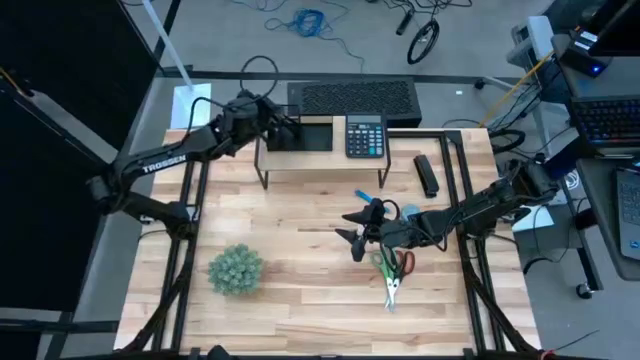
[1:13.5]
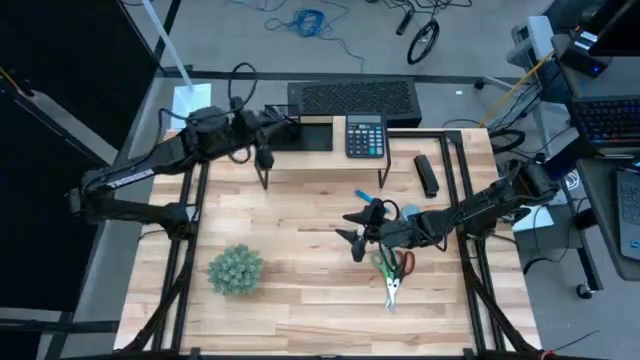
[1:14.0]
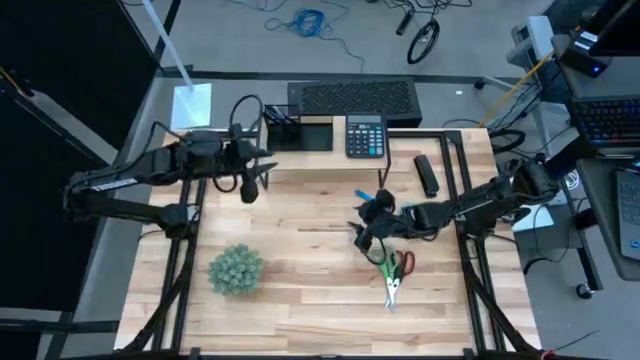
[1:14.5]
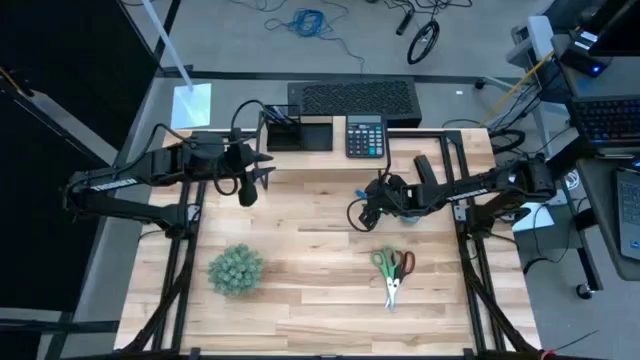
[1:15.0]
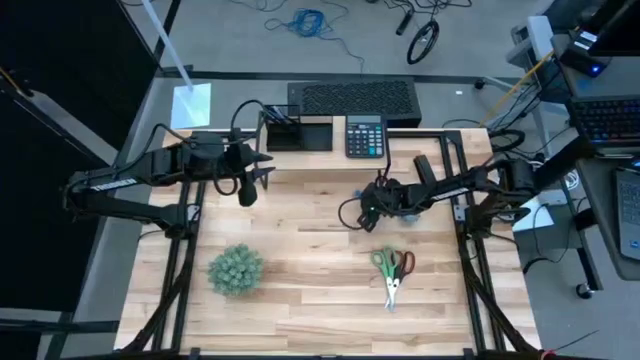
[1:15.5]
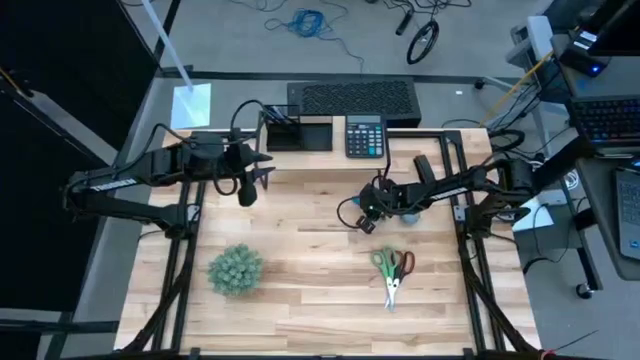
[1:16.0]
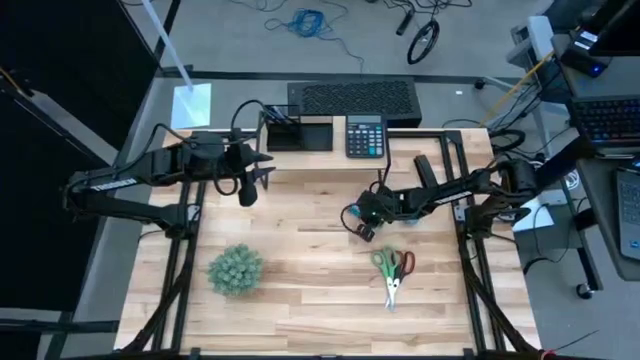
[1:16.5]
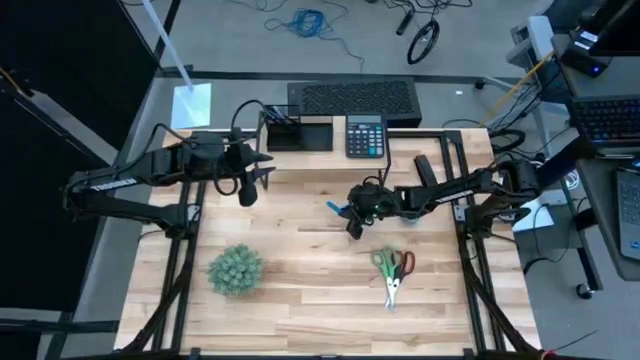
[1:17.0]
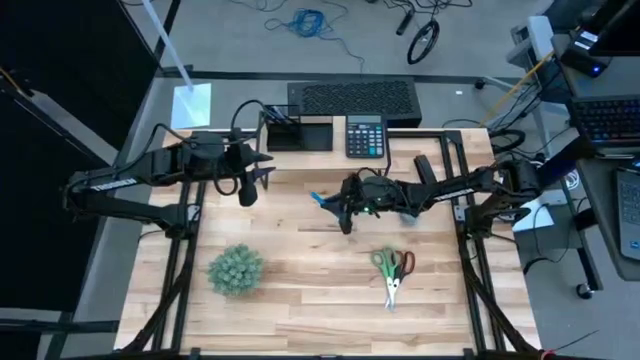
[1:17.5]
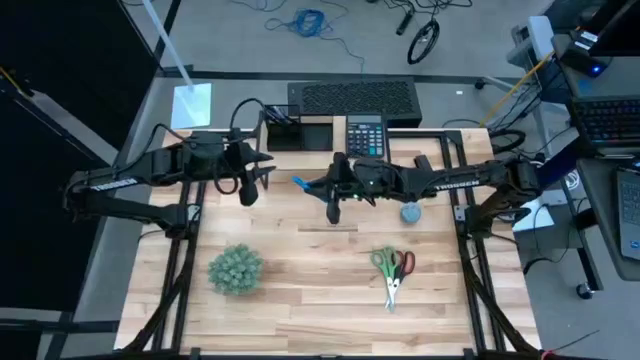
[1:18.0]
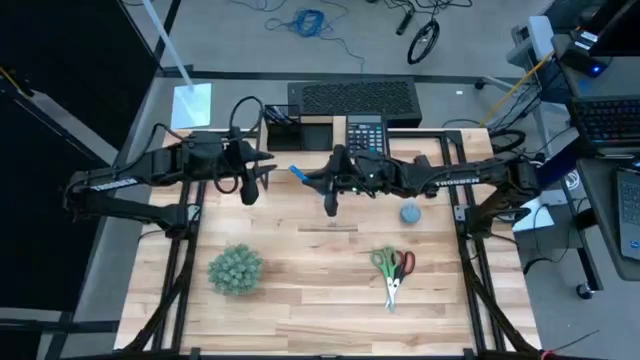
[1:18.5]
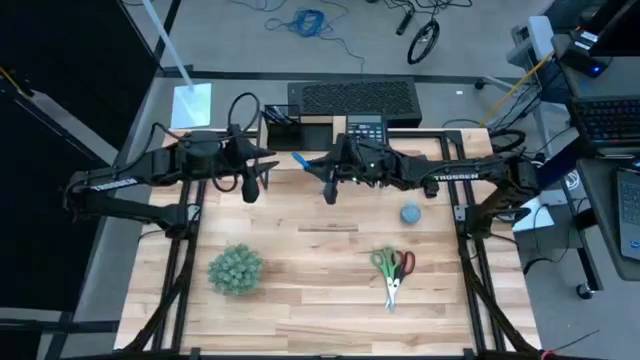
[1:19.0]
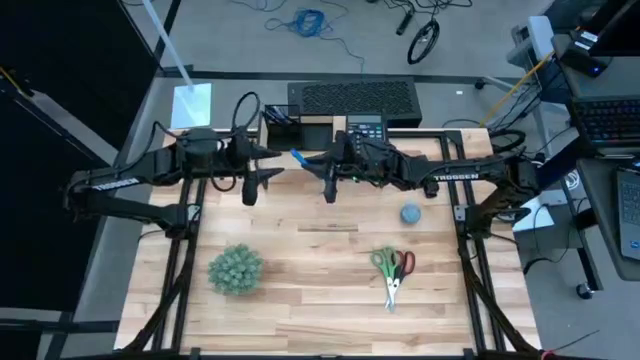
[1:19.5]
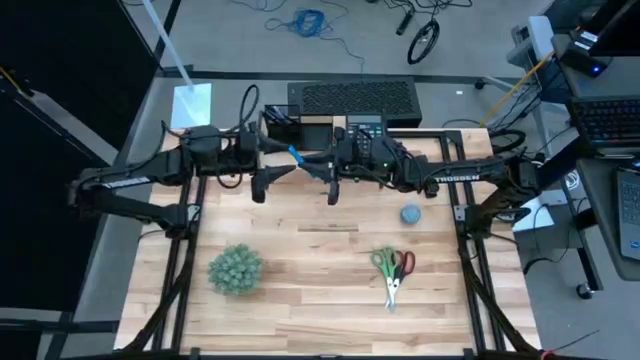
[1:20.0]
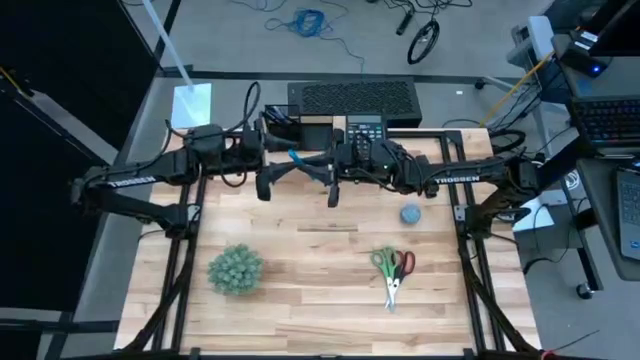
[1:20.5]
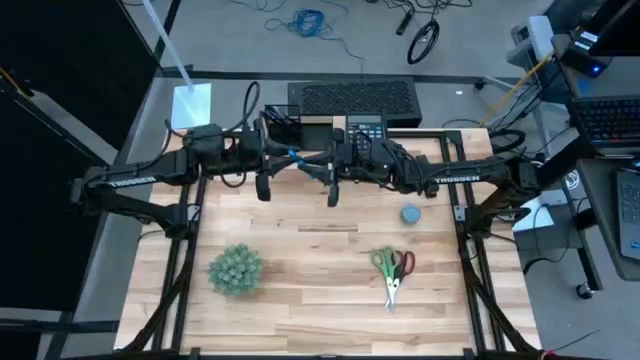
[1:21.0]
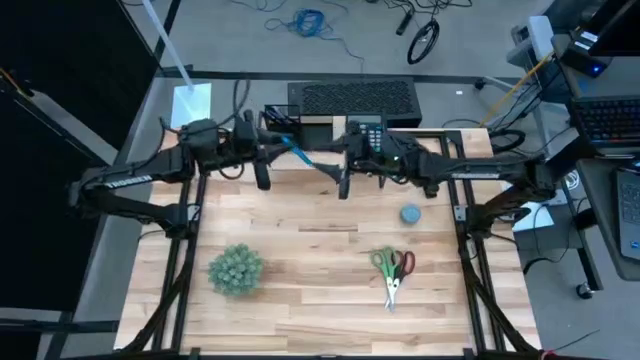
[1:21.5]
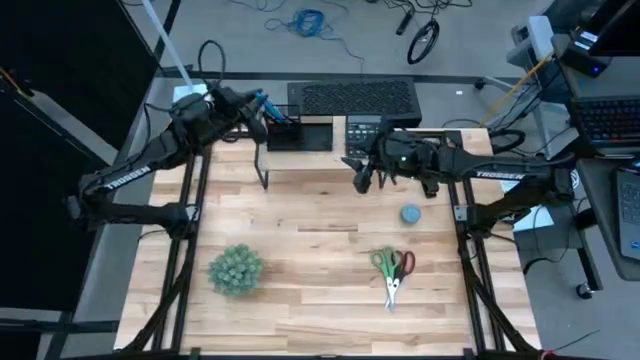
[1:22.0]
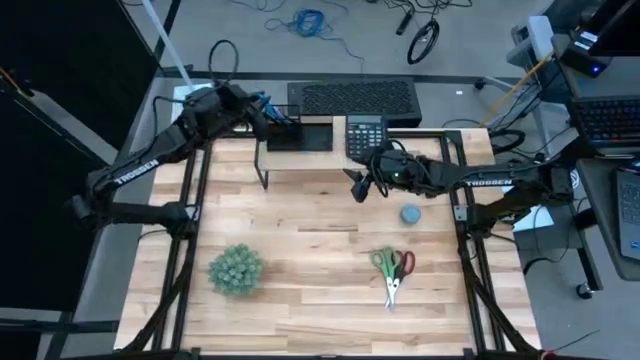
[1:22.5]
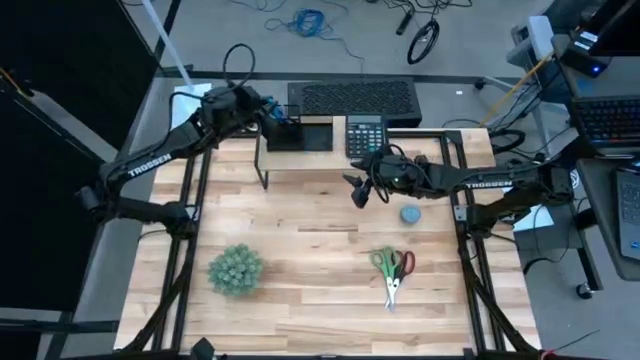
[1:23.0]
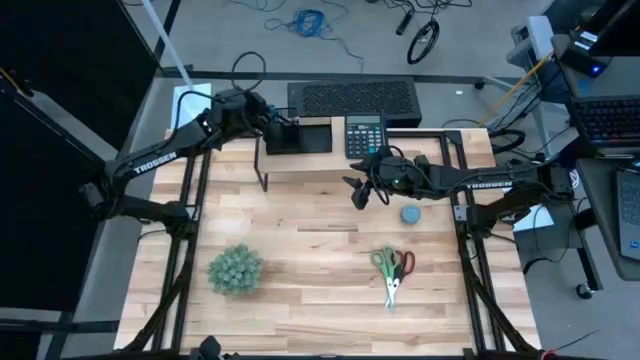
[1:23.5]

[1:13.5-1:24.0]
Task: Pick and place office supplies into organizer
Put the blue pen into the desk organizer on the shelf

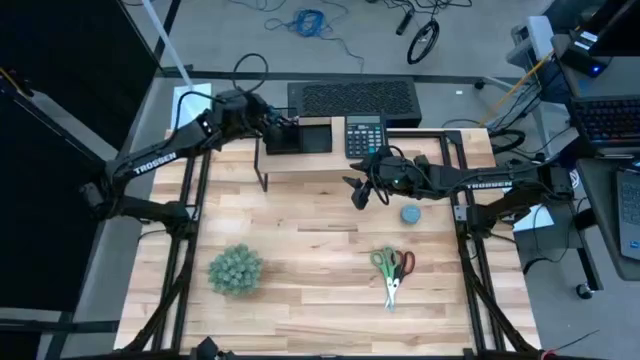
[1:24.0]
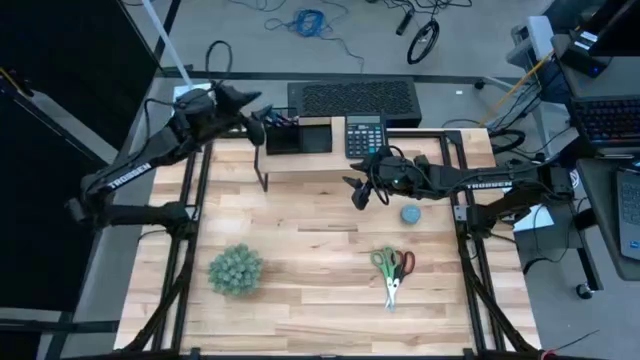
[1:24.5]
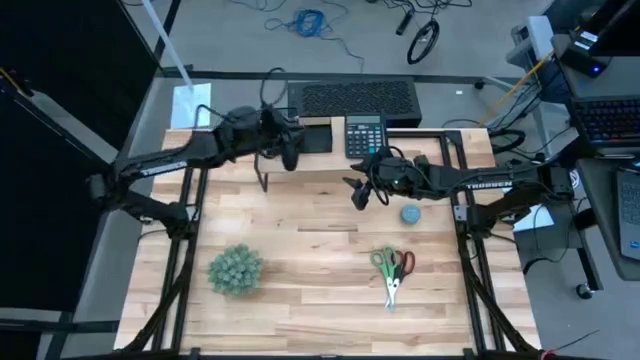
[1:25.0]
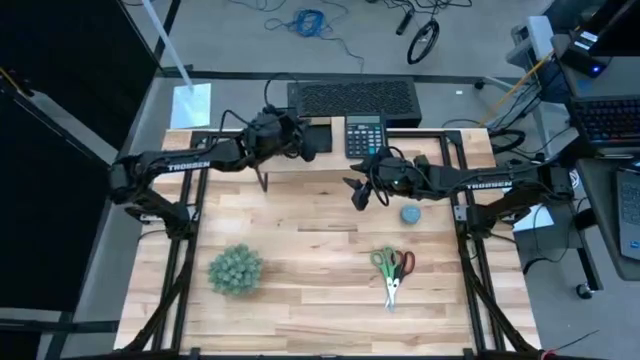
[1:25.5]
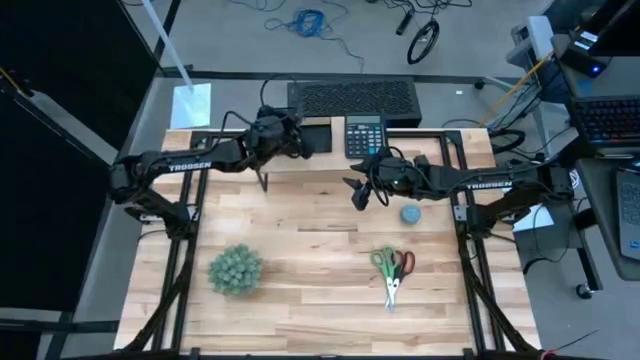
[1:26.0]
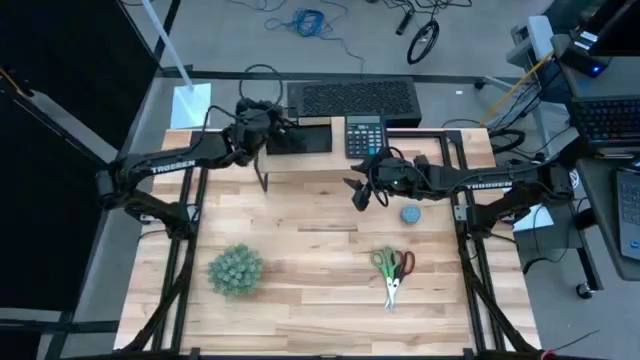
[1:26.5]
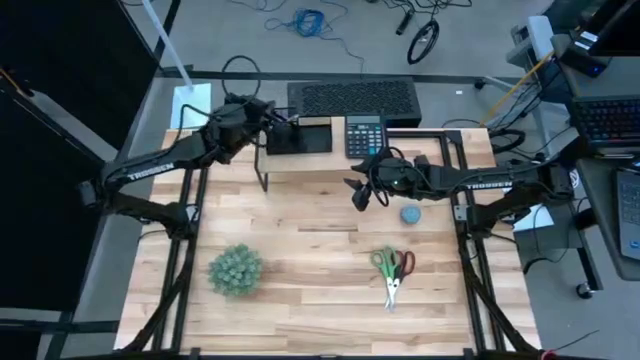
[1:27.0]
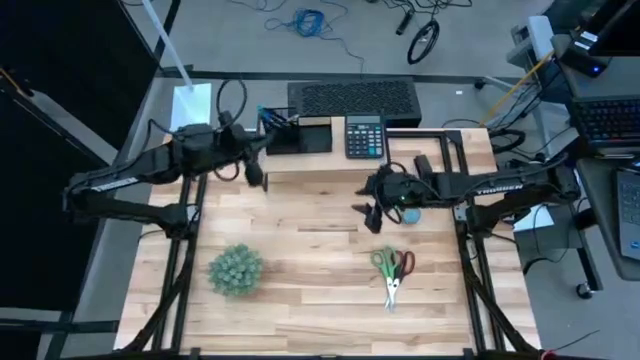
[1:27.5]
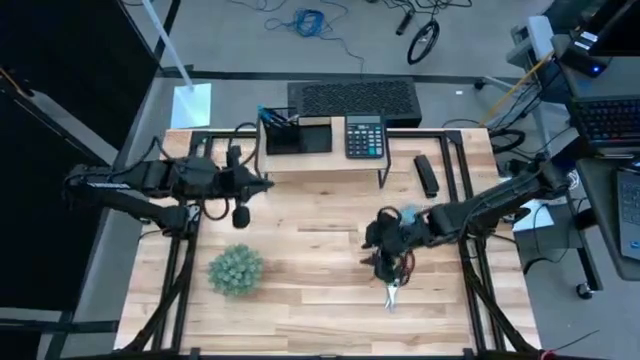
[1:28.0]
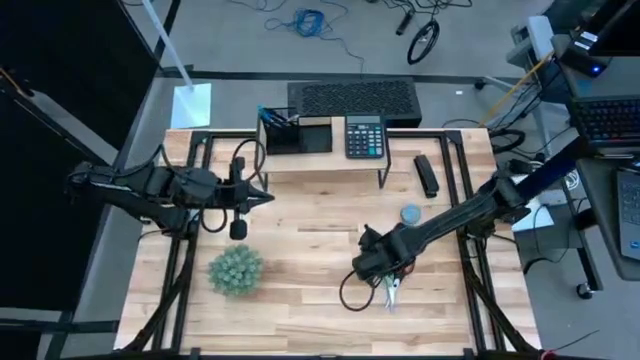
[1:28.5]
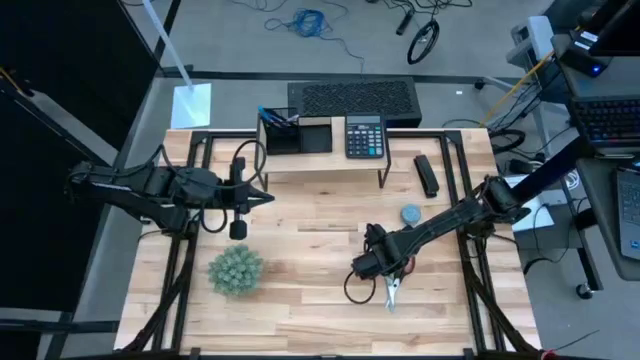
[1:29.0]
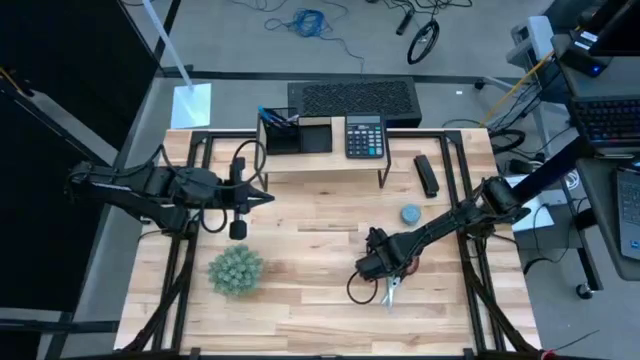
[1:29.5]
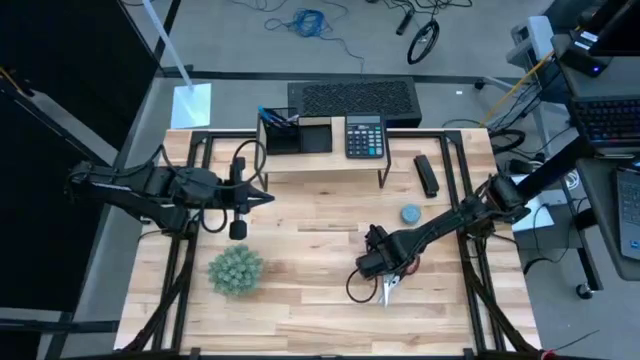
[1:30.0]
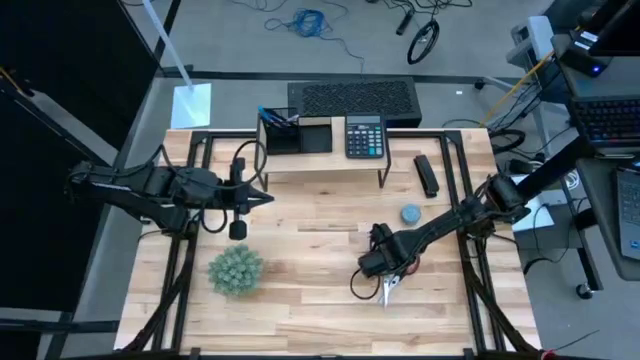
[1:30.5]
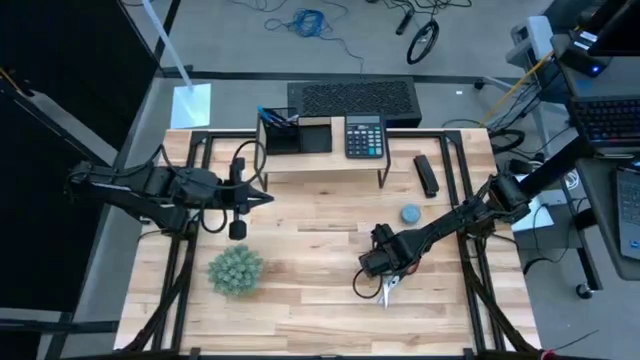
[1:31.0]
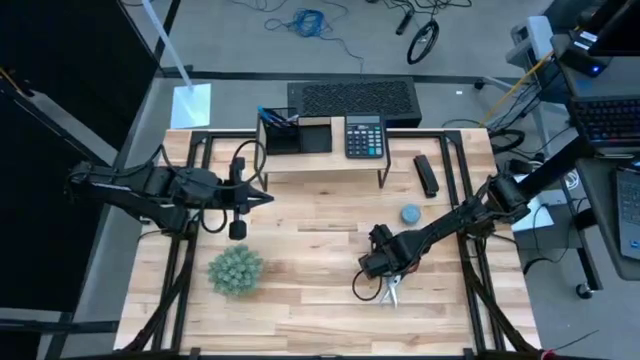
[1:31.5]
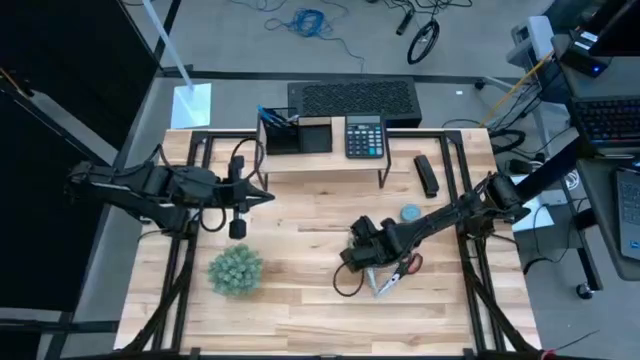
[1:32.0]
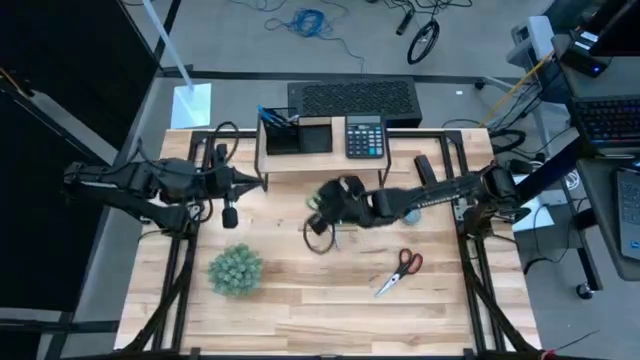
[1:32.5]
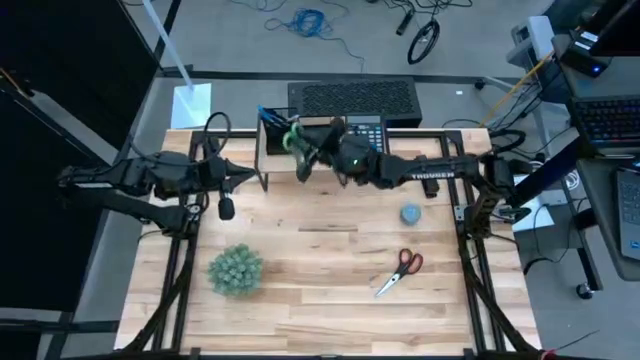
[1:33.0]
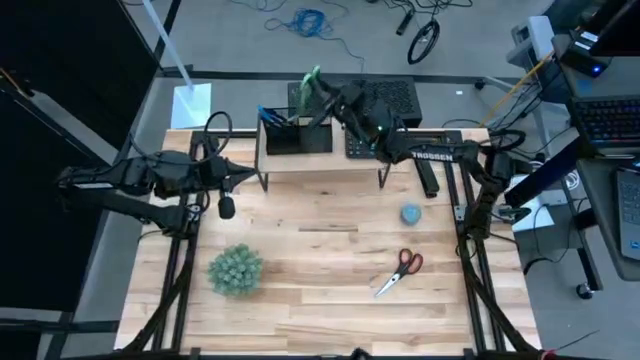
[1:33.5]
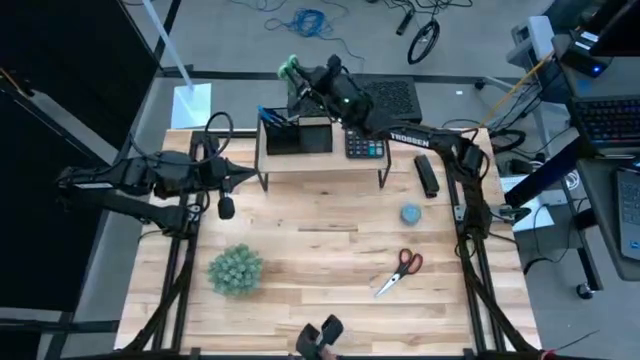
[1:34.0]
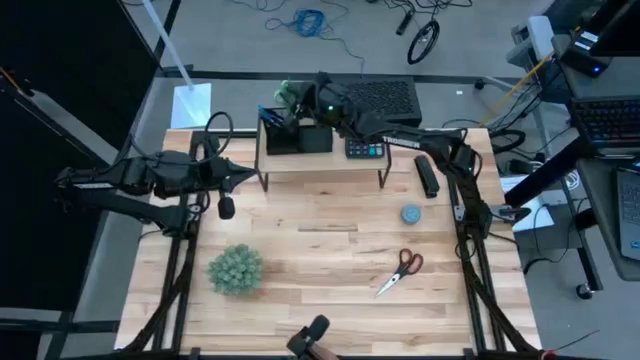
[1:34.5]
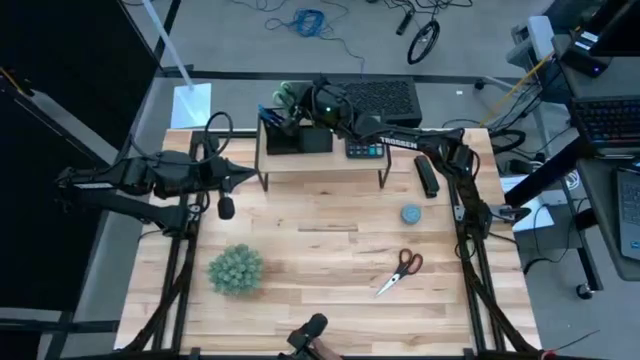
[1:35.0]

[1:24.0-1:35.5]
Put the green scissors into the desk organizer on the shelf
